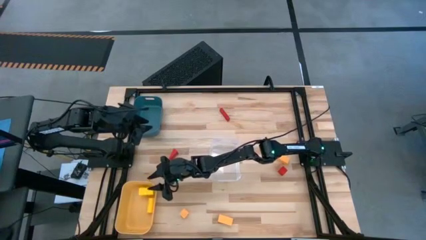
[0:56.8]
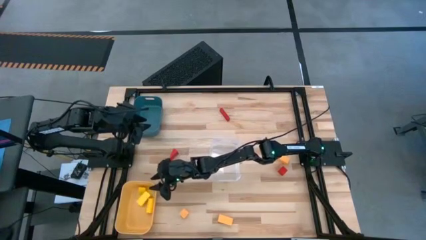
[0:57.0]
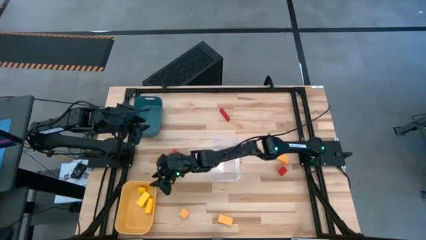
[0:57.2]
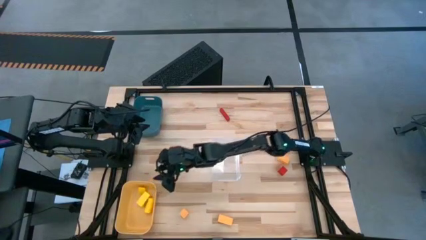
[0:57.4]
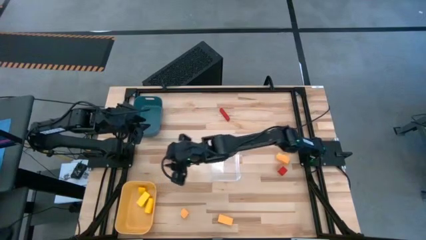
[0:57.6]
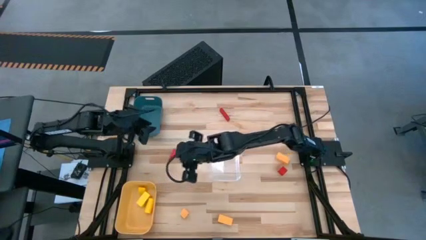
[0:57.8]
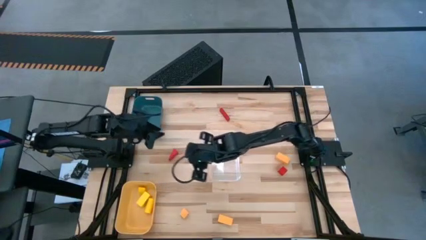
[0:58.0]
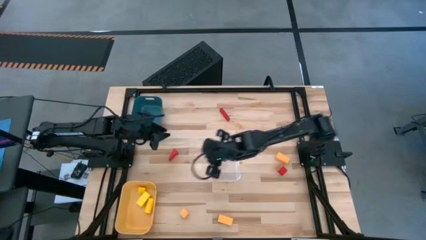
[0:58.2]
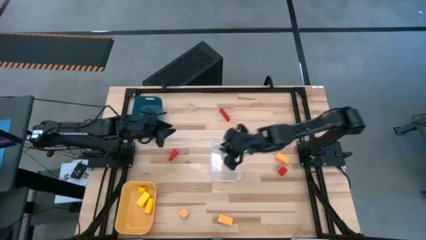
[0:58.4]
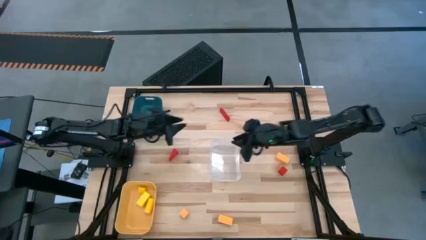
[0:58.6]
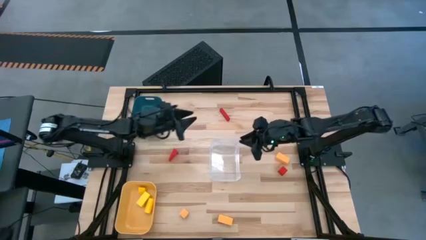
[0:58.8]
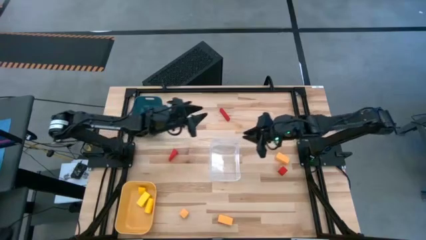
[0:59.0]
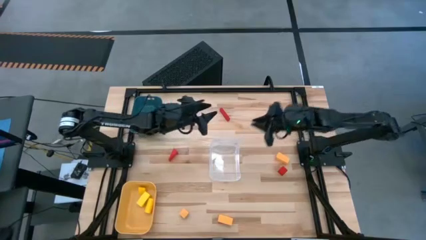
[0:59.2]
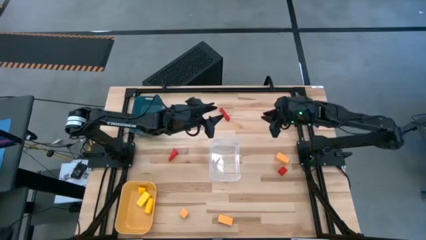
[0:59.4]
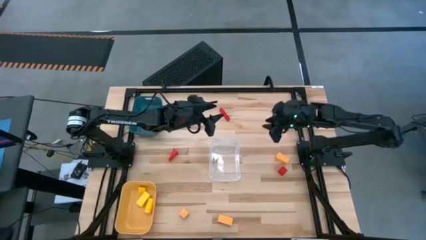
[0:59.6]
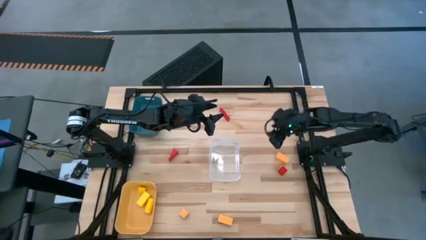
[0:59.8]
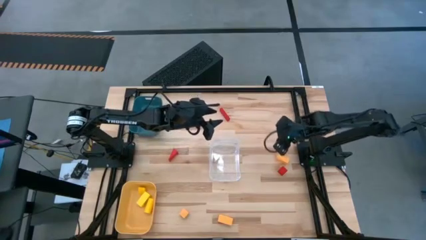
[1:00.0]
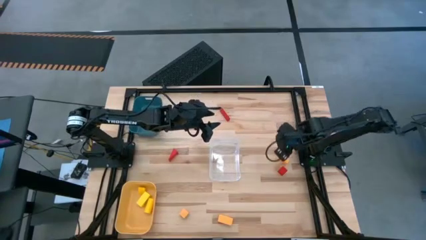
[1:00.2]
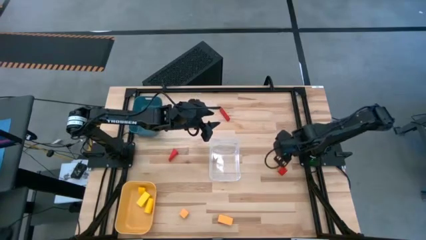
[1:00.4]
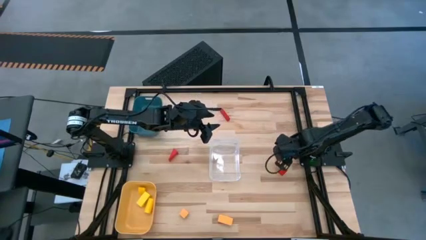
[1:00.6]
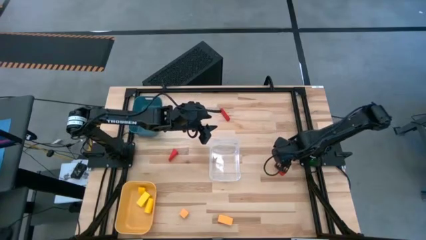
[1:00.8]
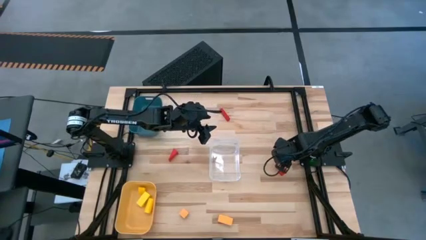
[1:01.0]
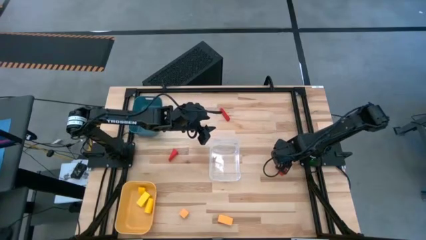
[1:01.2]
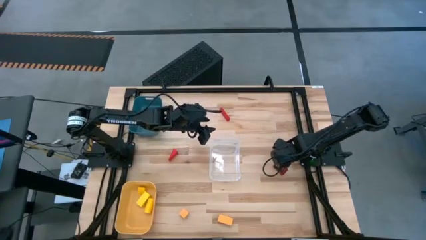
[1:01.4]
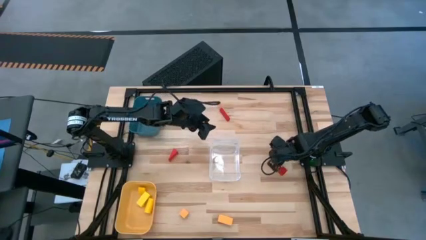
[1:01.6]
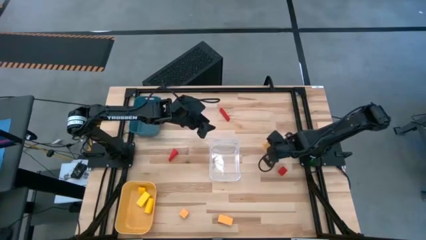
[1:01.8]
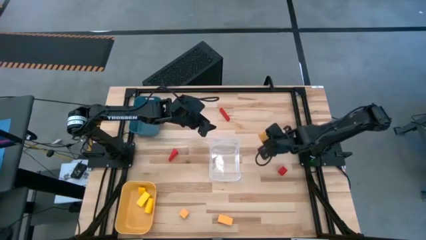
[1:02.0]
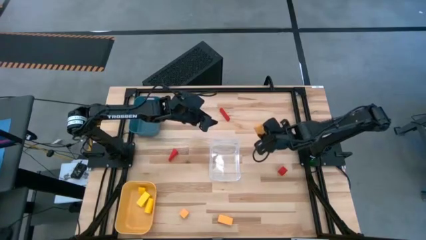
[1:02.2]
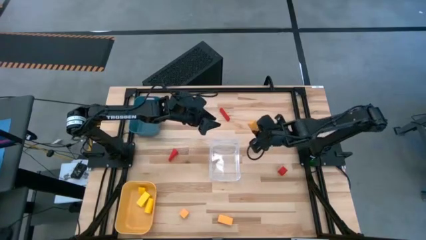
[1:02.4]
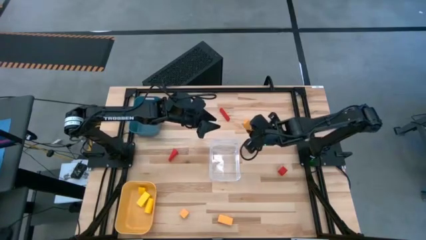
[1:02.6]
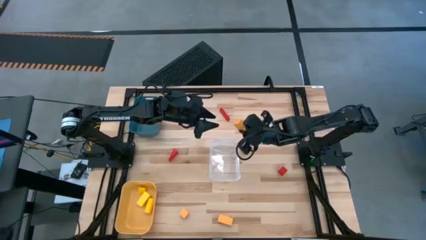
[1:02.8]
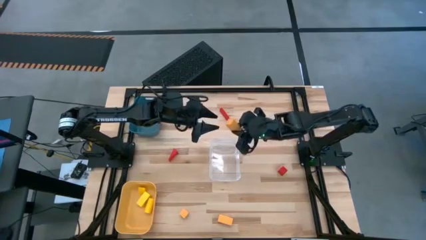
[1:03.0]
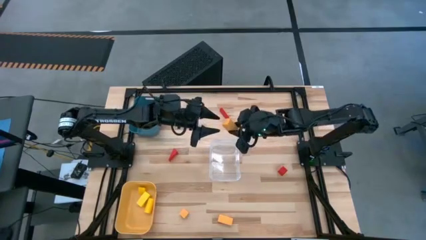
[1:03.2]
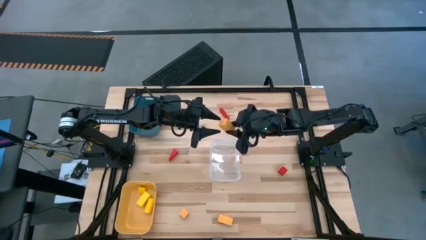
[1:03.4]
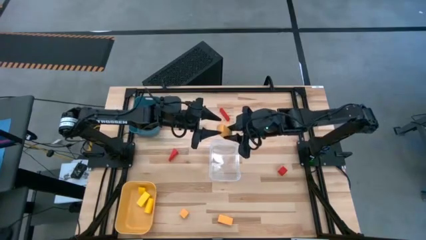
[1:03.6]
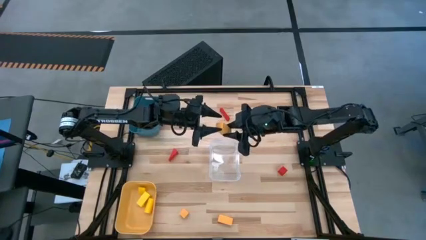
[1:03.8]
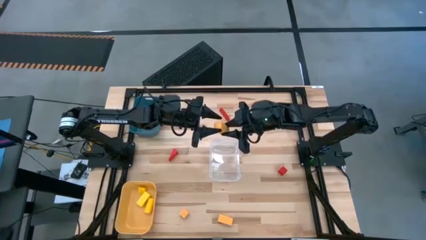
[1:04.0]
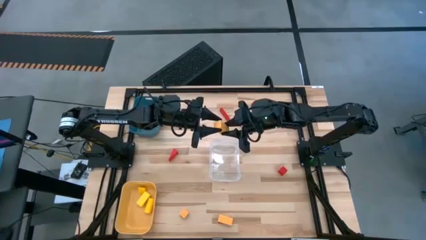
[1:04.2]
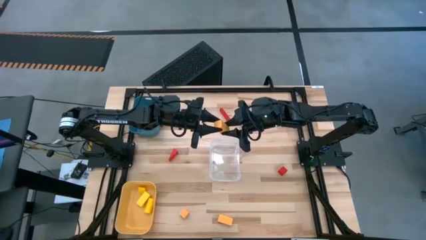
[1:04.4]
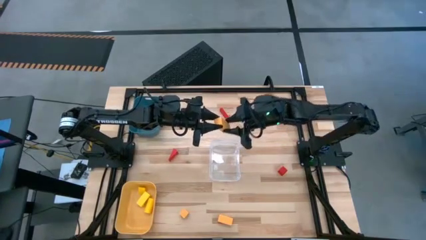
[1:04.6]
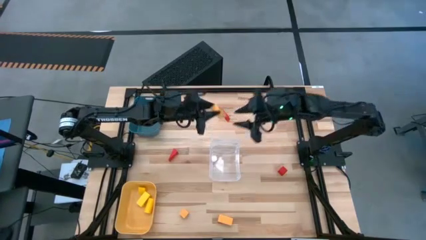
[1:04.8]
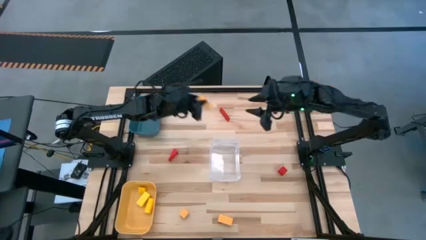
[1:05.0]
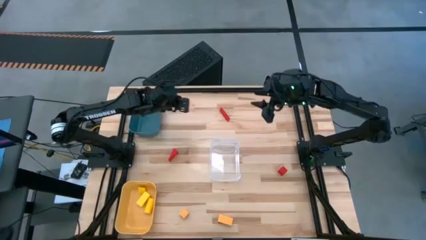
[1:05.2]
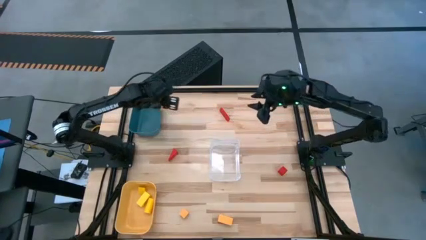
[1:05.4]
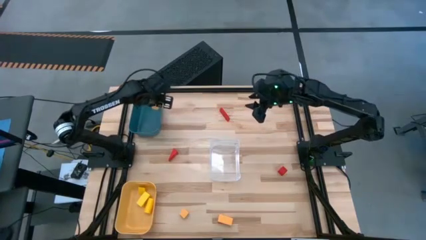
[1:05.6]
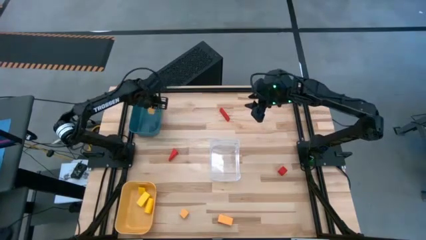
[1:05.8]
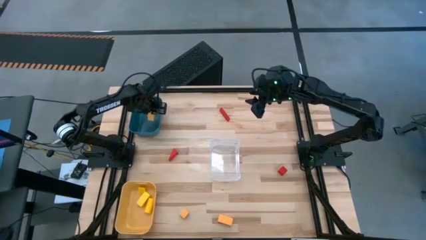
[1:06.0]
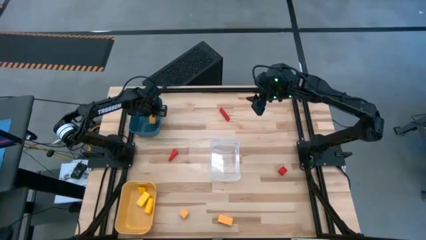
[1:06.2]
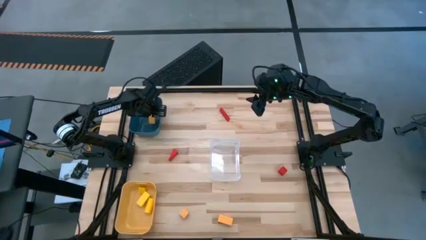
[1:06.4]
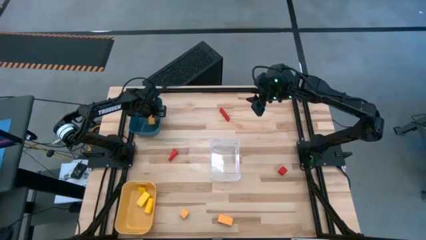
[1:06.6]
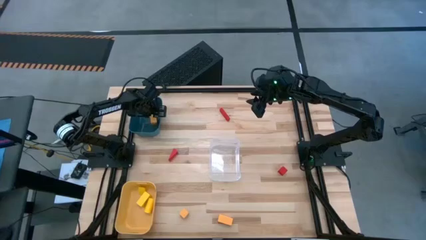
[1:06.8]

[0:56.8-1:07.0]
Task: Sort & place blocks by color
Put the top right orange block into the blue bin

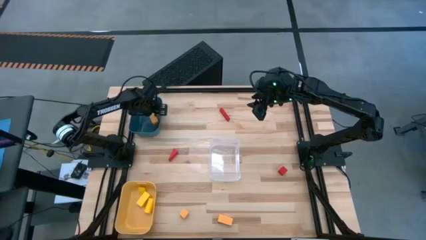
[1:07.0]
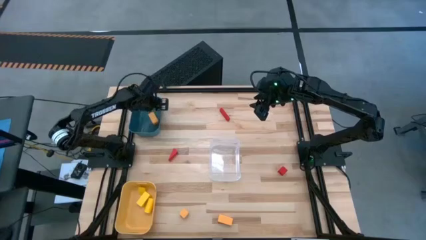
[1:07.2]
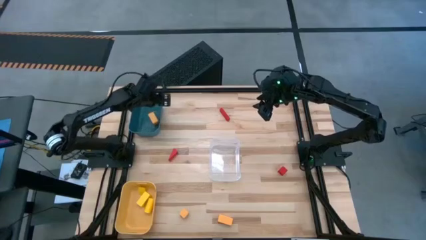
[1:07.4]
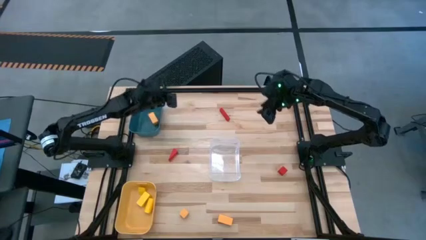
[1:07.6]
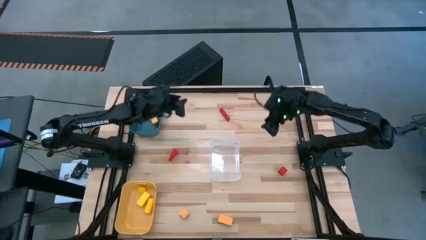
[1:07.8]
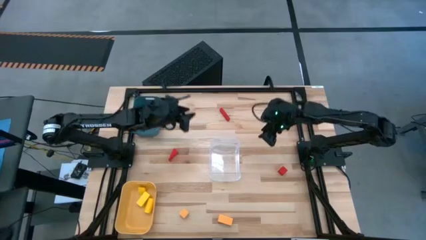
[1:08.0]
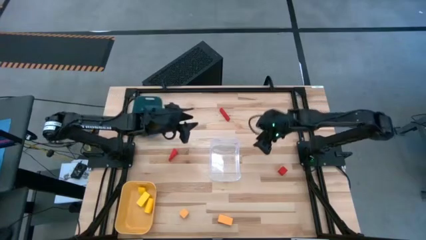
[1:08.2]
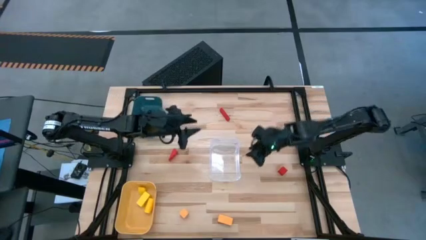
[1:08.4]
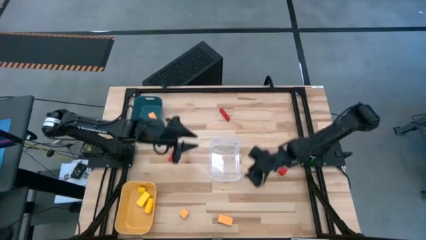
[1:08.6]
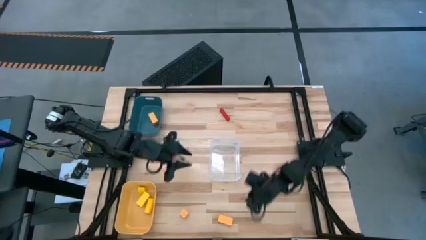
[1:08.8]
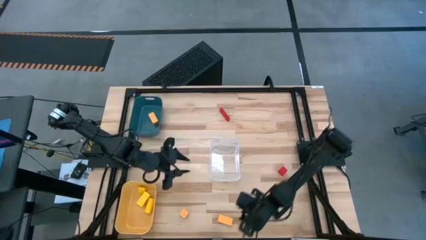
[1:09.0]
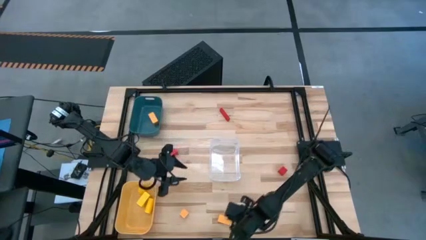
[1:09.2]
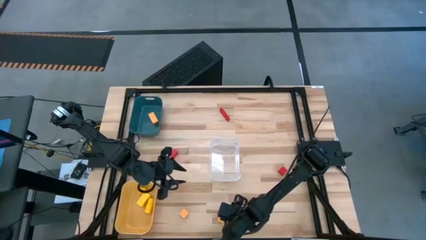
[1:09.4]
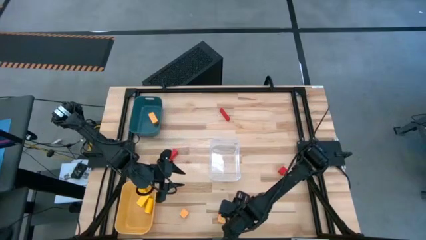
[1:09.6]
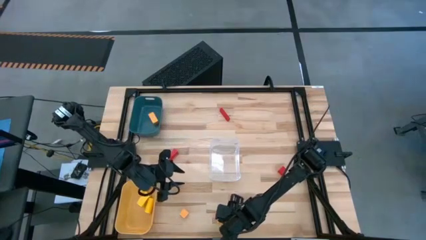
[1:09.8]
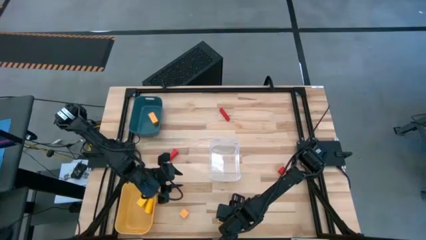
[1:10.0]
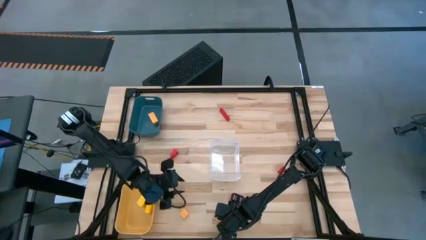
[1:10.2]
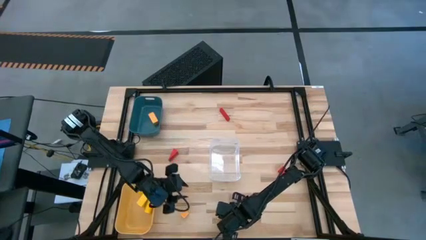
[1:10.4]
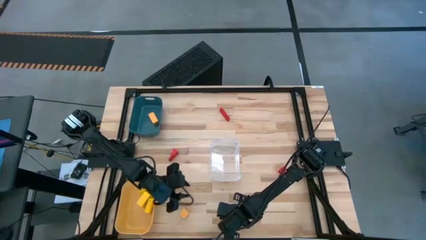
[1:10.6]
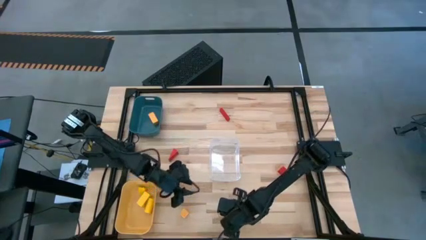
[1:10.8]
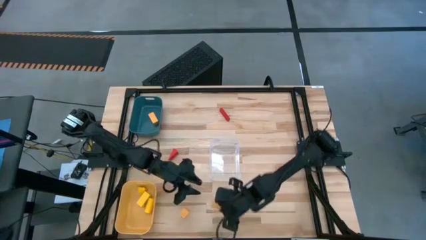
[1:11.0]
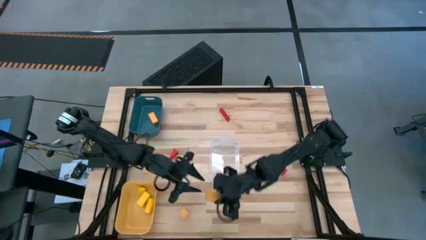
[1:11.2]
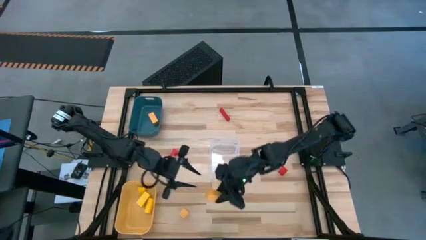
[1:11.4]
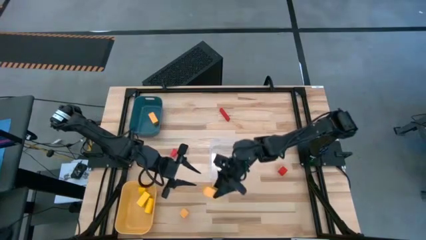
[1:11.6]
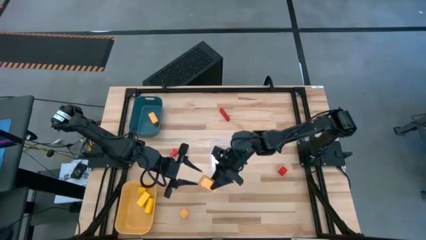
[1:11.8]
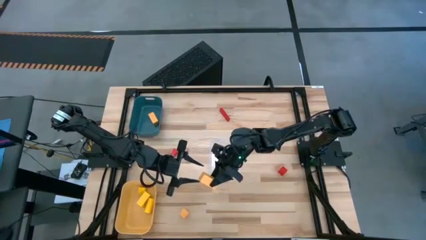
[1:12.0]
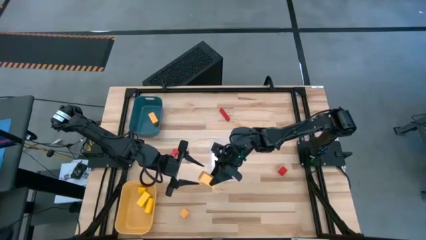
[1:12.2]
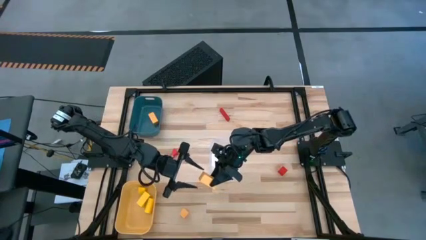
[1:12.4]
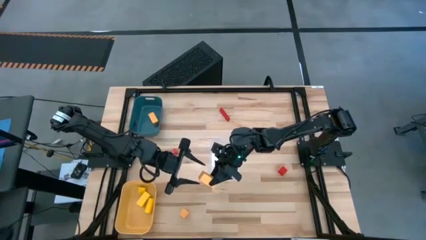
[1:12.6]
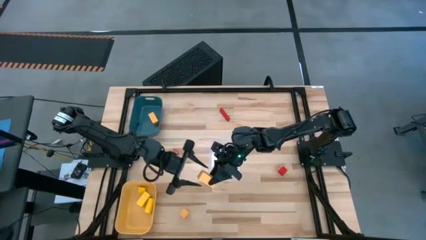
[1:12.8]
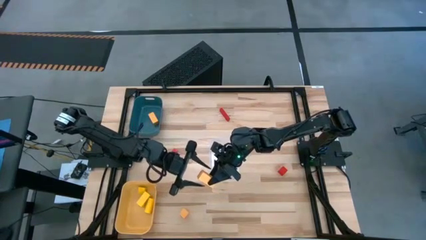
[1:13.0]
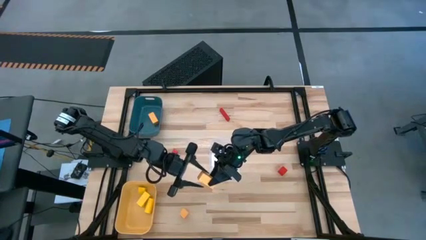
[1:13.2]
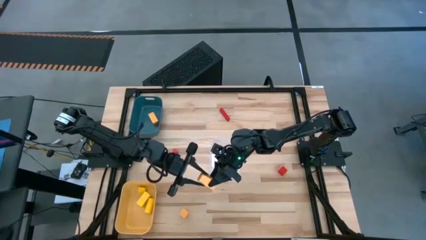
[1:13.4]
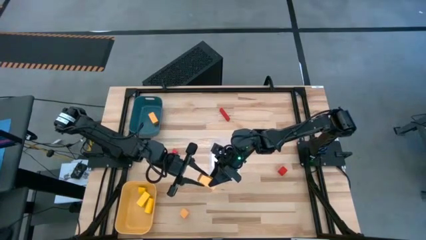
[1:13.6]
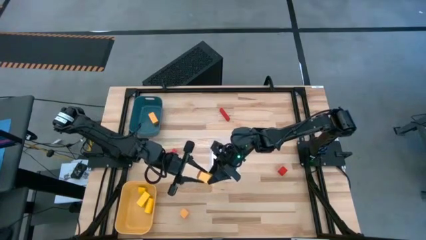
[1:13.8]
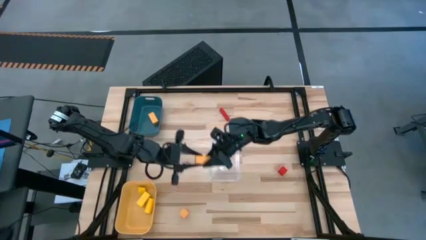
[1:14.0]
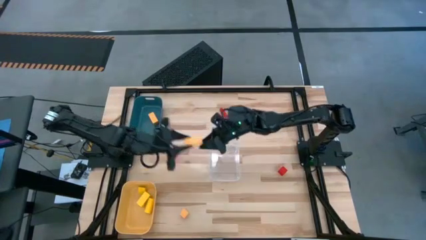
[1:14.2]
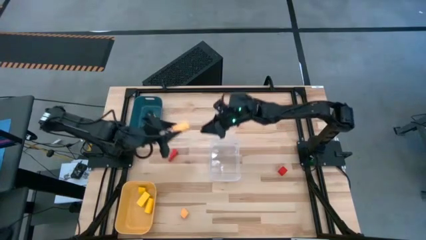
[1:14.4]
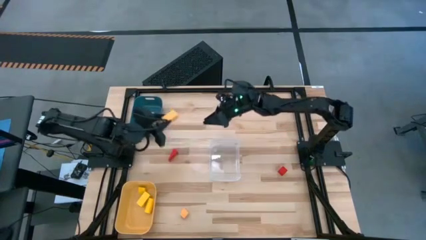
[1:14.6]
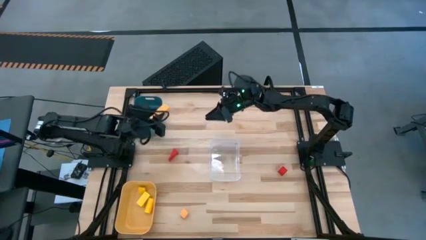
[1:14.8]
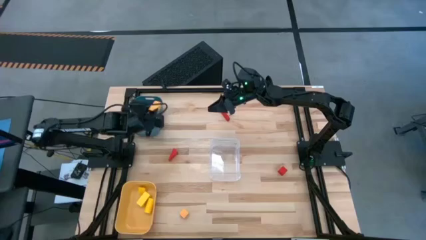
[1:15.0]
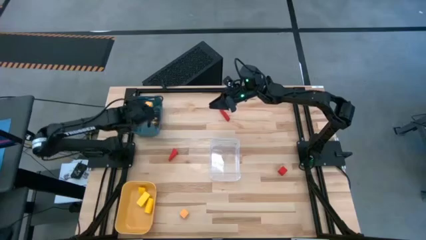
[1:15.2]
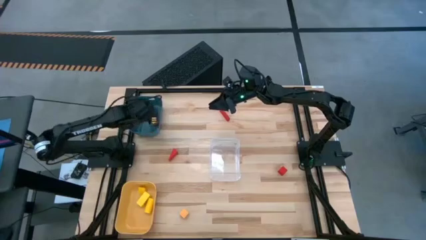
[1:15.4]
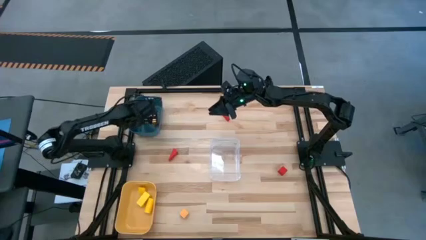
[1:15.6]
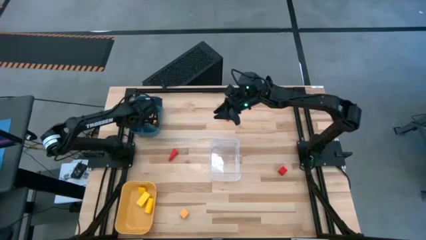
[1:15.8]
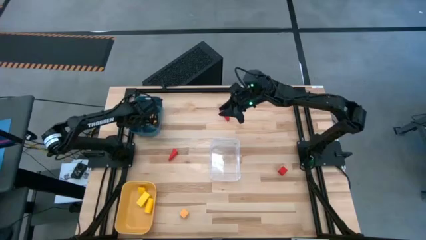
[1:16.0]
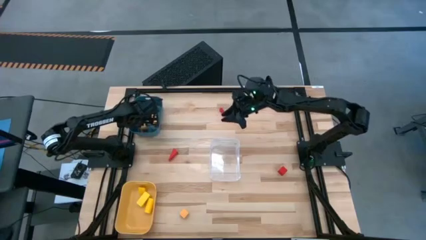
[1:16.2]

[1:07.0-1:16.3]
Put the right orange block into the blue bin
